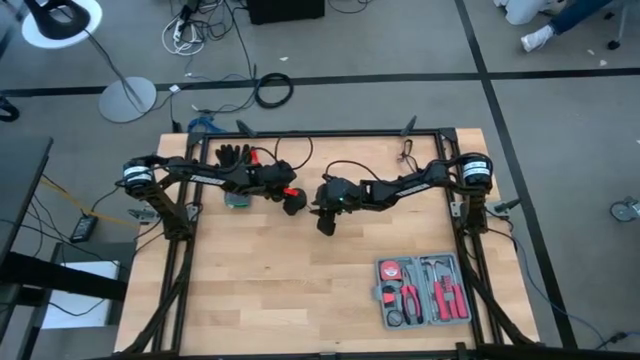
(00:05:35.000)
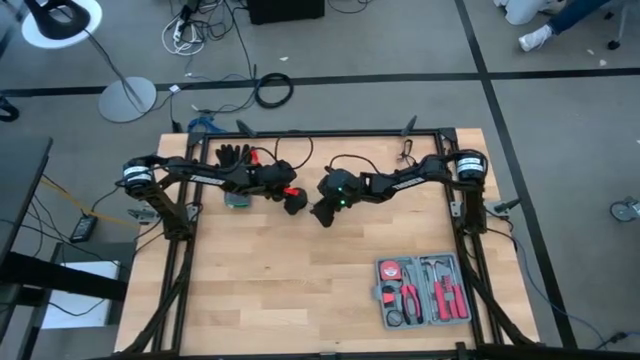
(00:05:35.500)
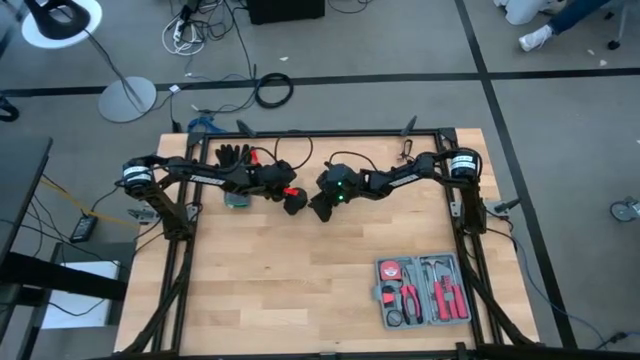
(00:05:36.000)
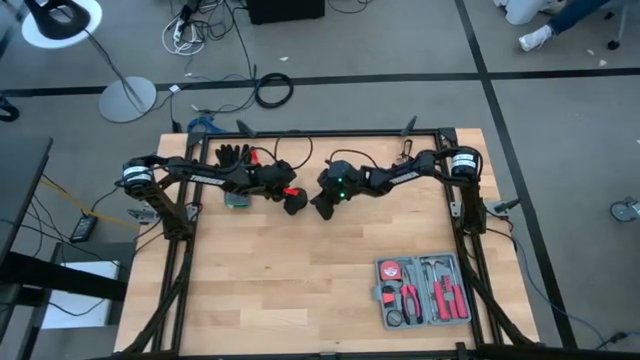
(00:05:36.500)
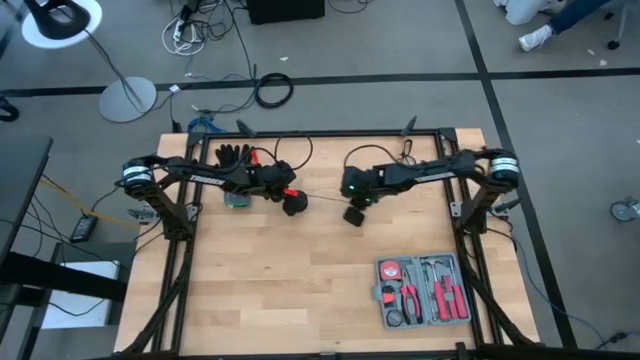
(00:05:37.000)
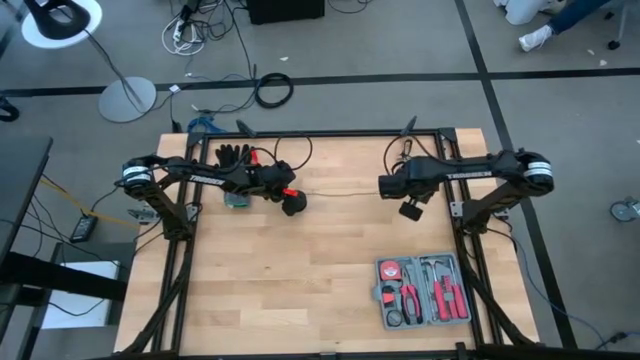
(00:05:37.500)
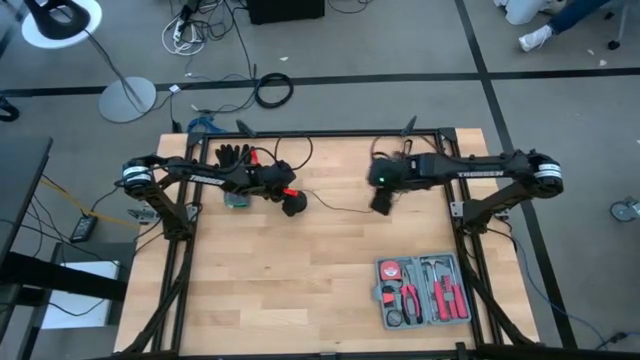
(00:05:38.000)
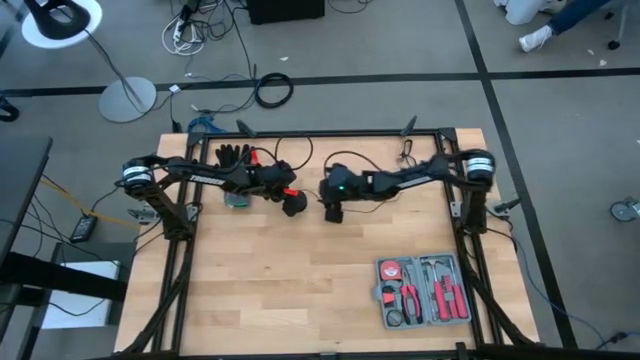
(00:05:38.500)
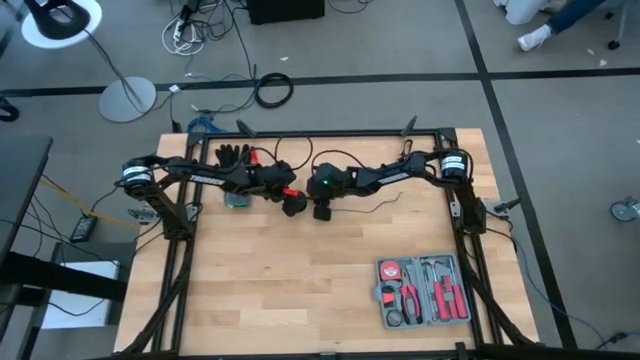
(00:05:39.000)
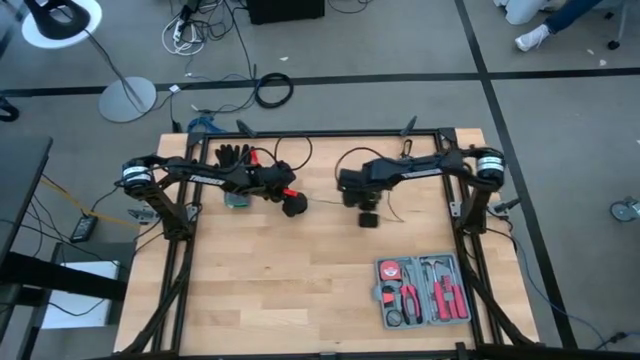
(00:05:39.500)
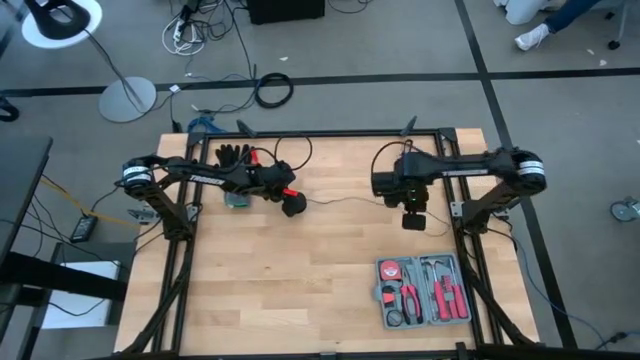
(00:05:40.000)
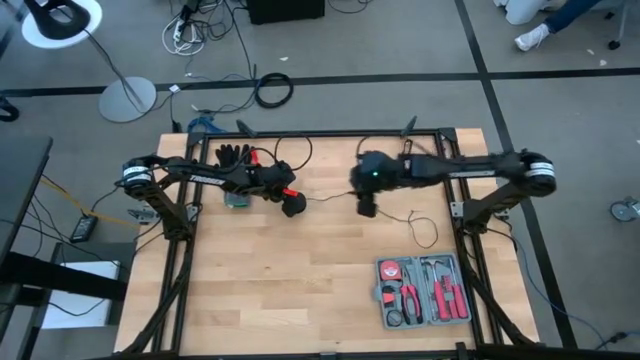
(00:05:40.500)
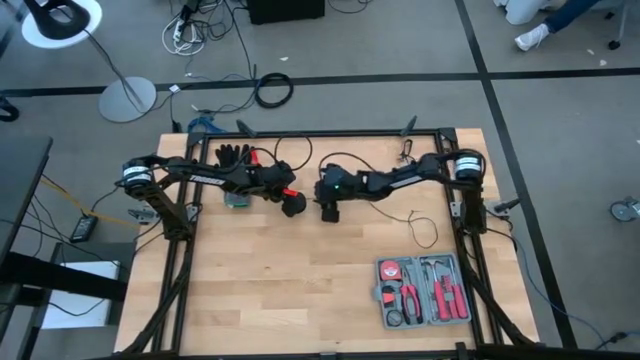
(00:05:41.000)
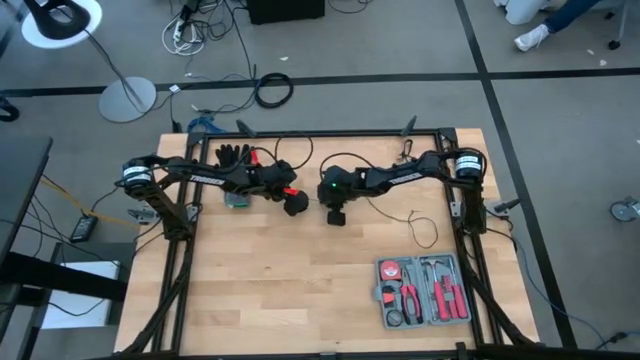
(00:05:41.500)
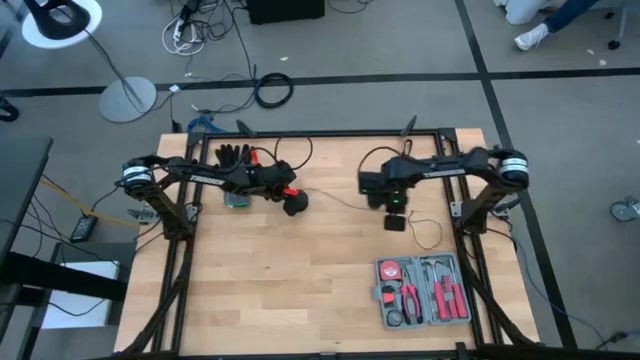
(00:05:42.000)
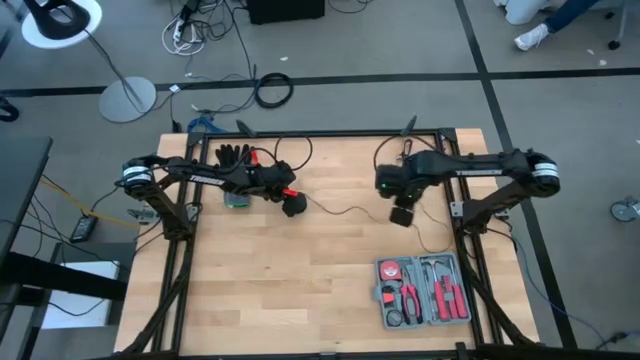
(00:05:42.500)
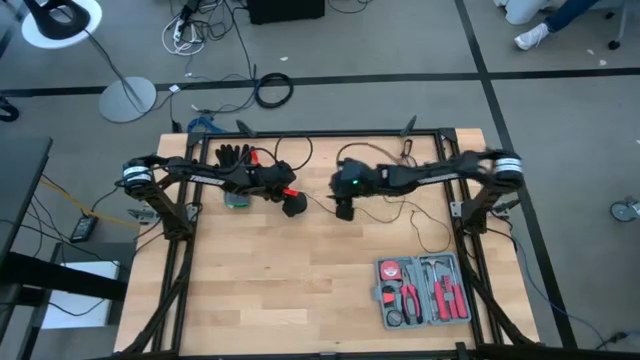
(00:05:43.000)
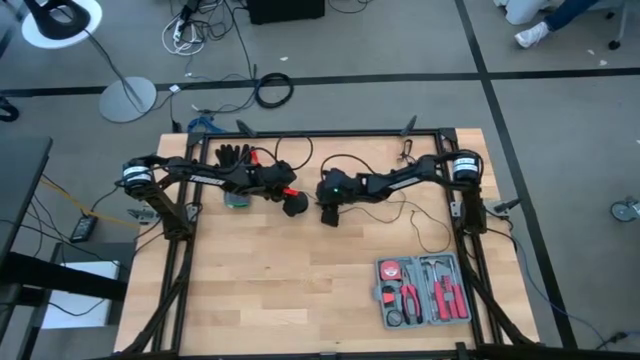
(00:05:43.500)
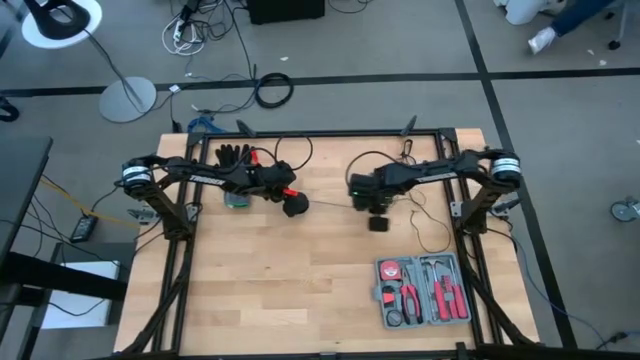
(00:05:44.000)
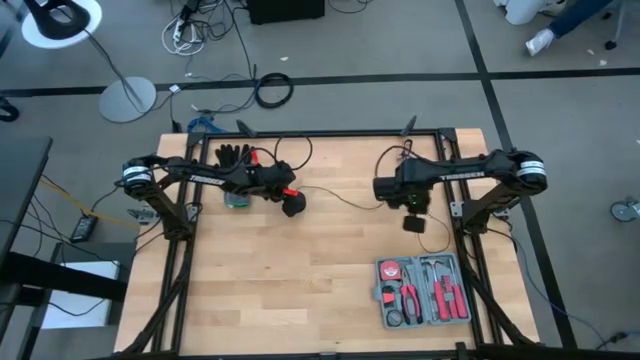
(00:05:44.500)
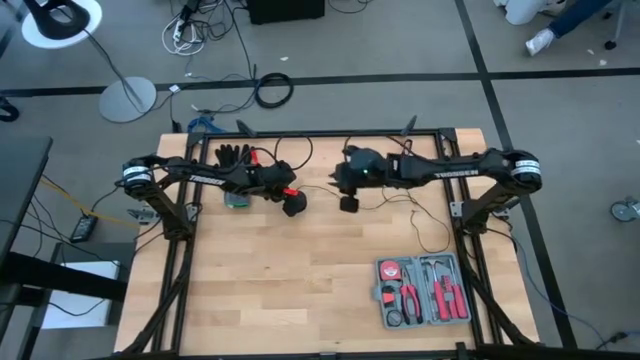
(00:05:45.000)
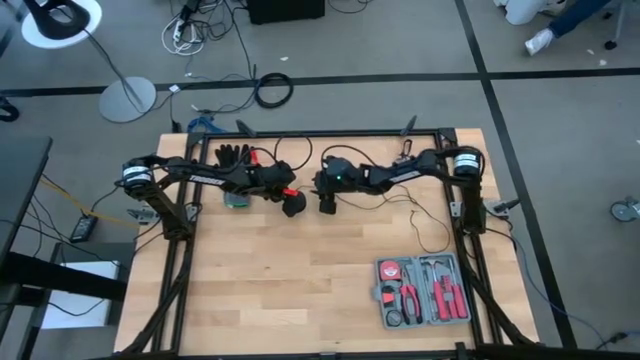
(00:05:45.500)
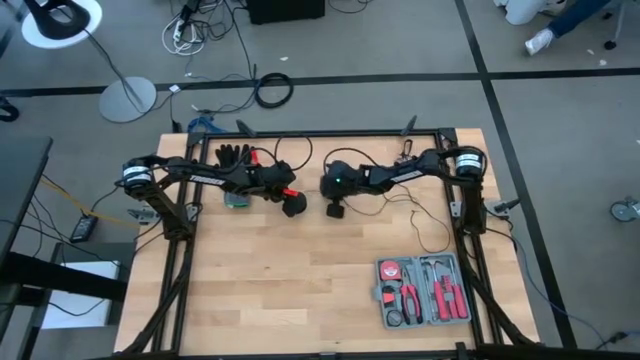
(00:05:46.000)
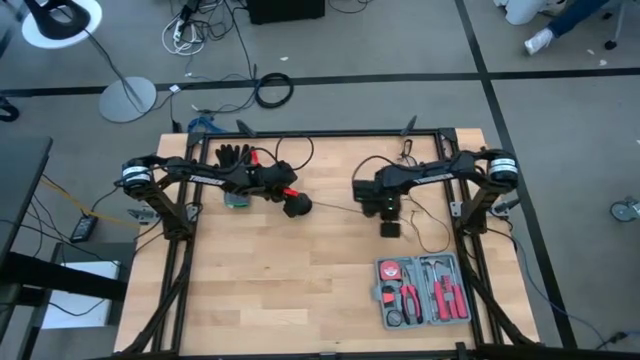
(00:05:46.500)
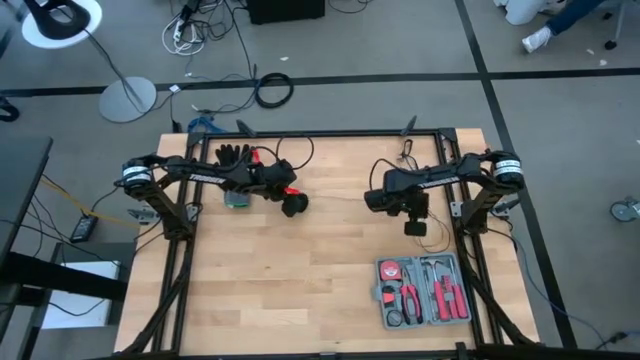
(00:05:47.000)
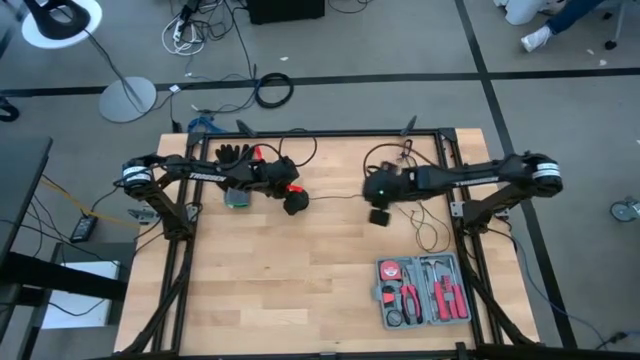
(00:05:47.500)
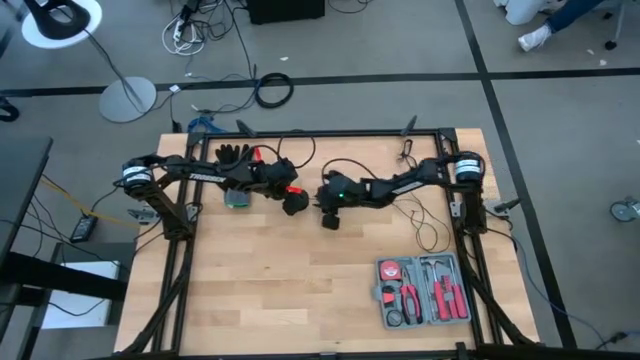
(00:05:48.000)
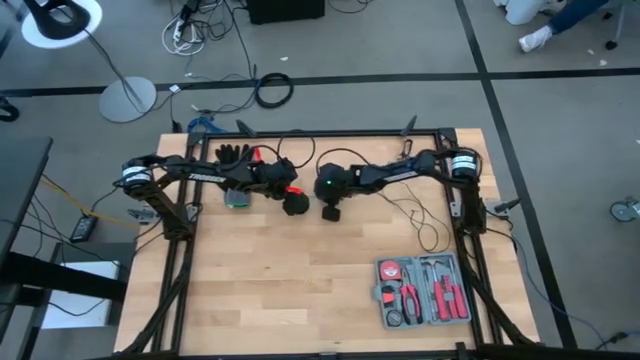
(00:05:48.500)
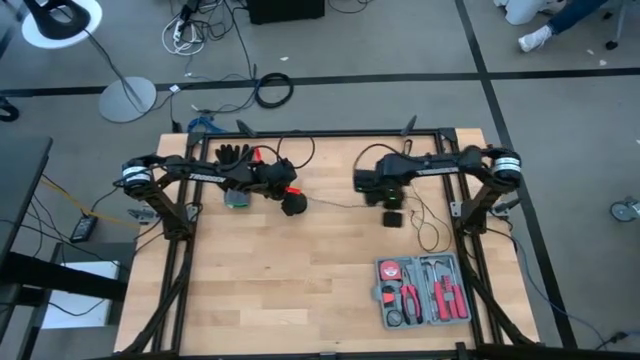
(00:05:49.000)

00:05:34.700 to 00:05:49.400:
Task: Coil cords
Uncoil the black wire from the spool

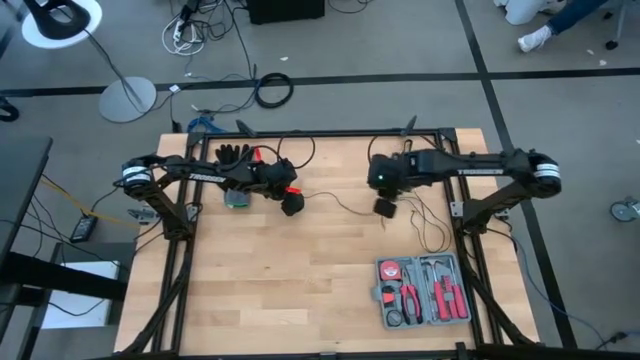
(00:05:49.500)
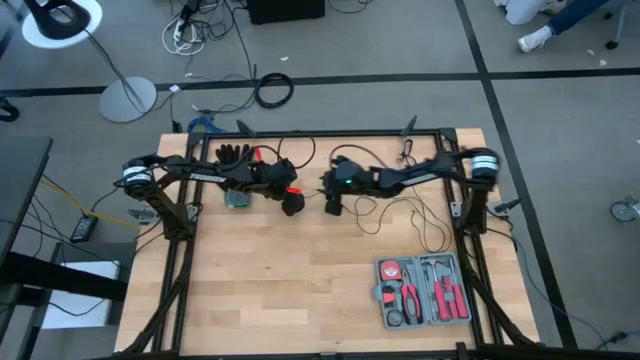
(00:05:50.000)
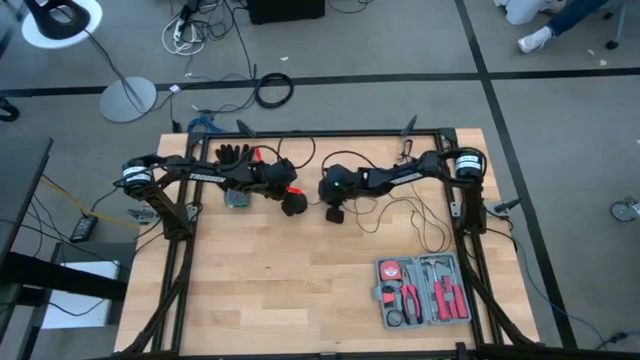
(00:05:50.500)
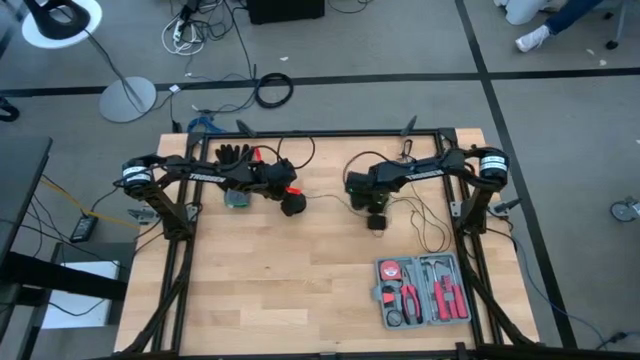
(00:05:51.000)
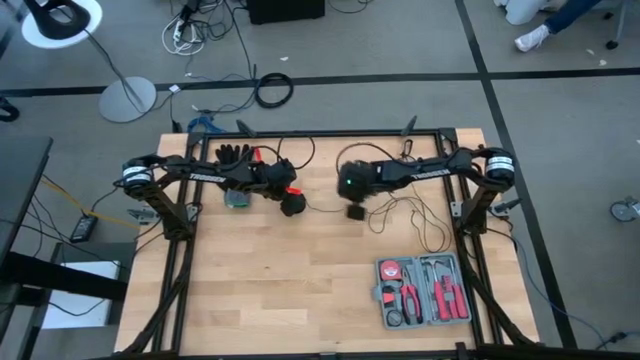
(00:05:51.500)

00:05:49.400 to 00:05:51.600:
Uncoil the black wire from the spool

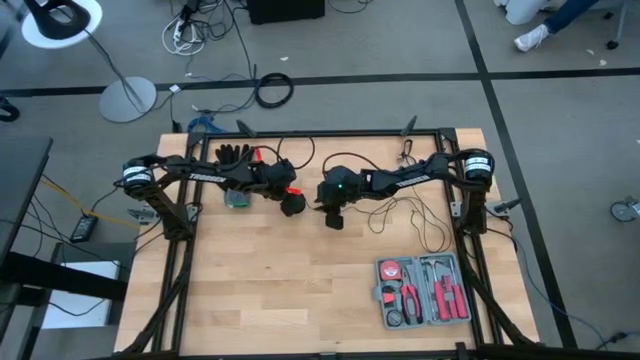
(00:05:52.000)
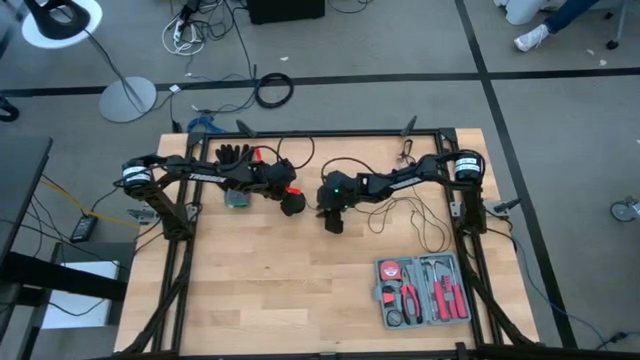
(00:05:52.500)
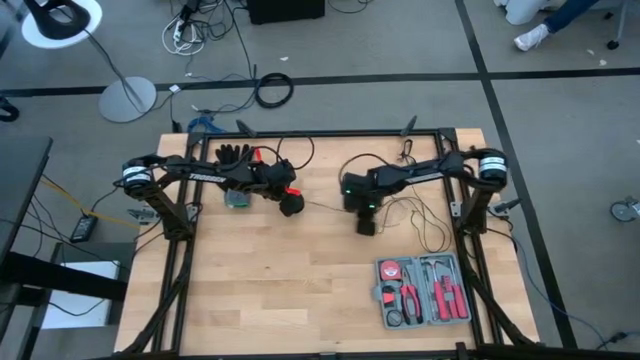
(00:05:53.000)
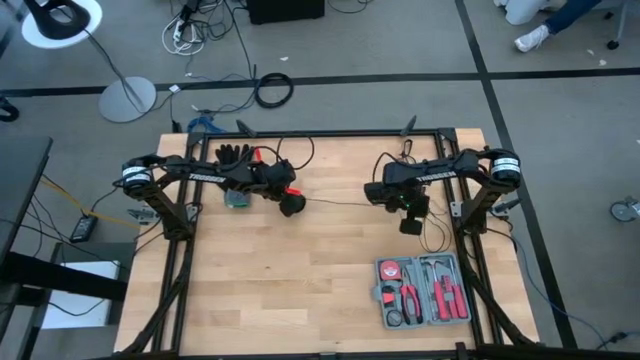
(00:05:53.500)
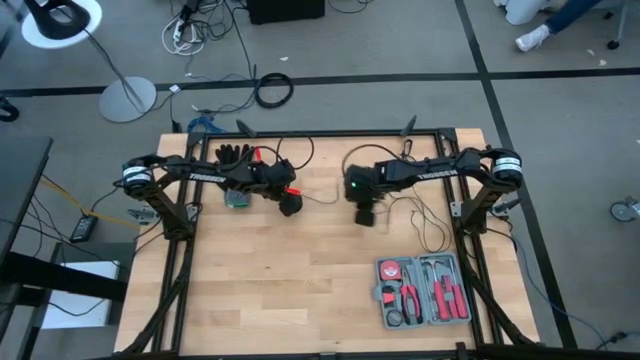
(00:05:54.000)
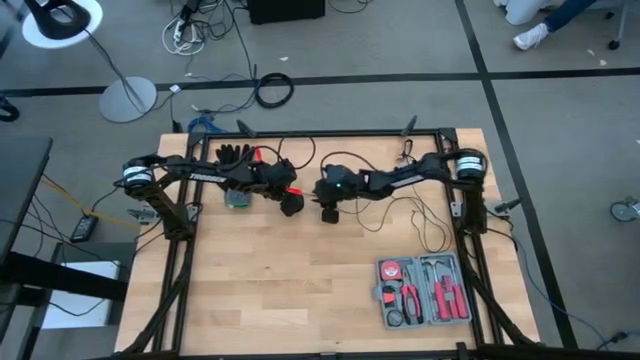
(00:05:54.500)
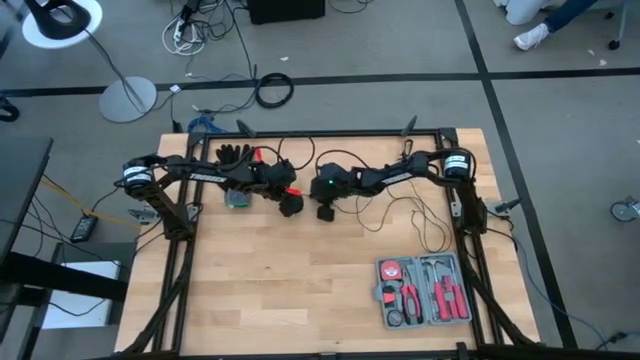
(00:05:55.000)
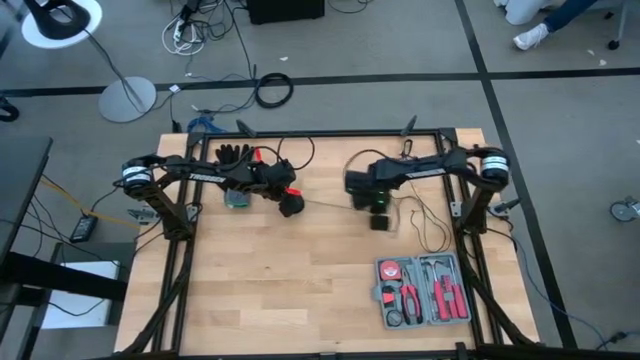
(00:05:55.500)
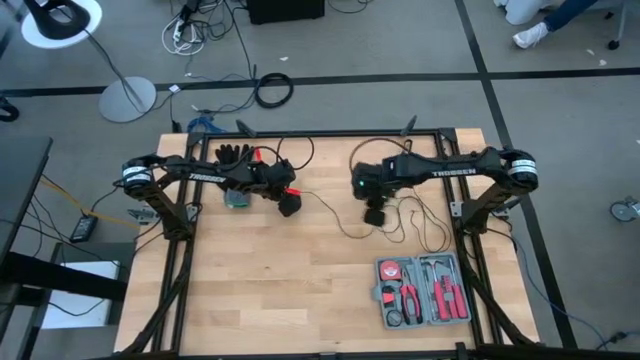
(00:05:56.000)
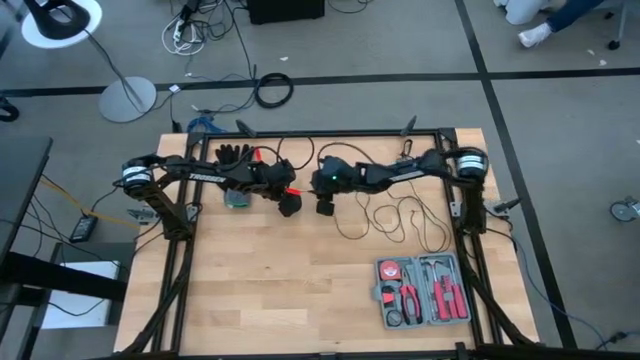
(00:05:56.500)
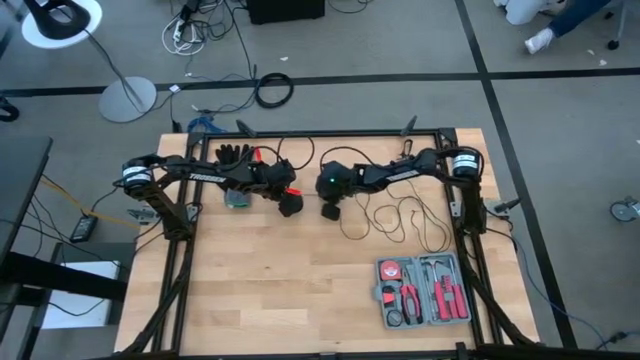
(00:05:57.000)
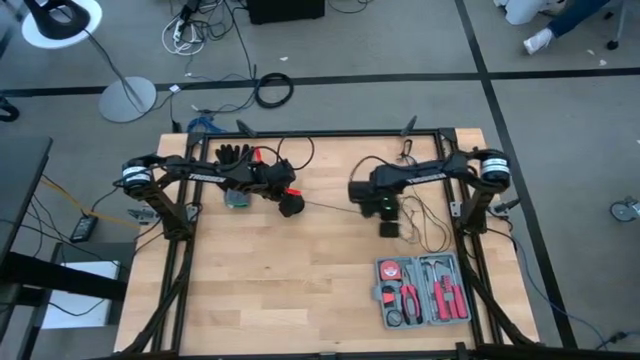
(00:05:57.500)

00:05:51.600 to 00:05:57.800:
Uncoil the black wire from the spool
